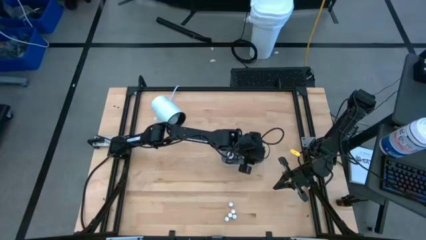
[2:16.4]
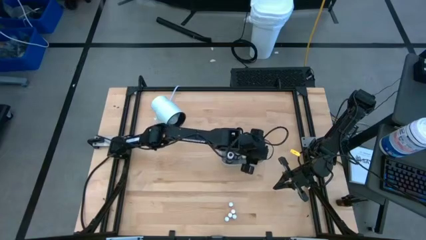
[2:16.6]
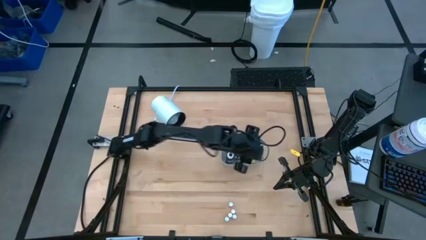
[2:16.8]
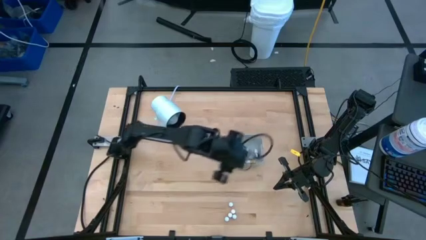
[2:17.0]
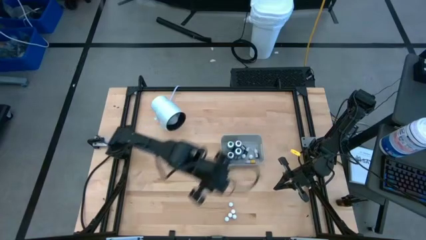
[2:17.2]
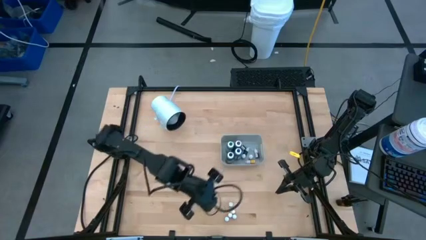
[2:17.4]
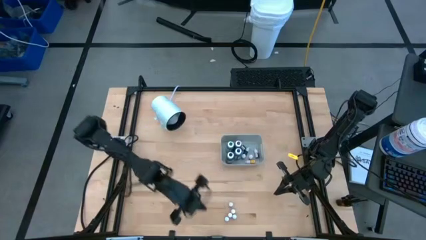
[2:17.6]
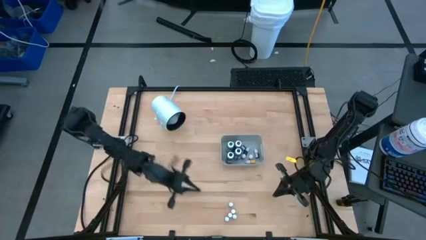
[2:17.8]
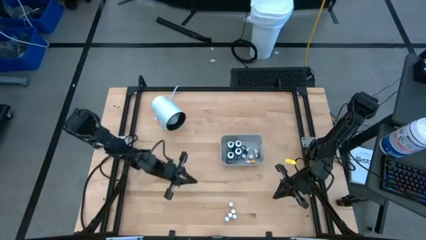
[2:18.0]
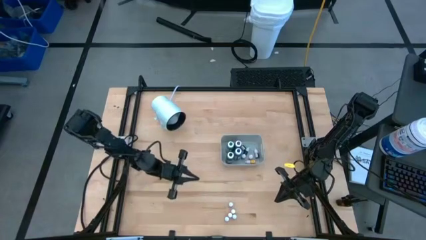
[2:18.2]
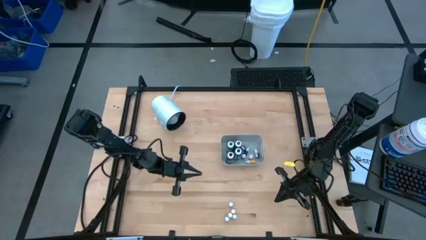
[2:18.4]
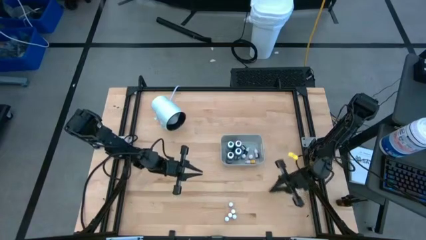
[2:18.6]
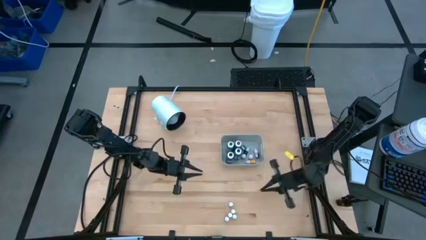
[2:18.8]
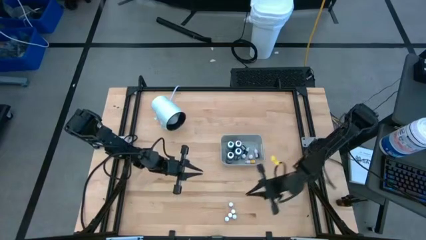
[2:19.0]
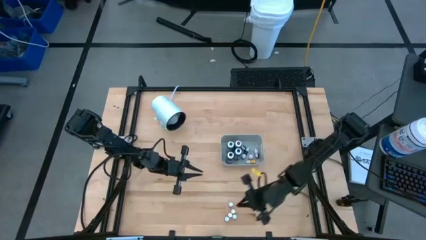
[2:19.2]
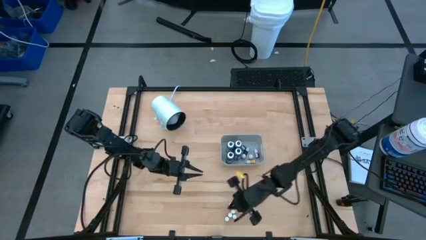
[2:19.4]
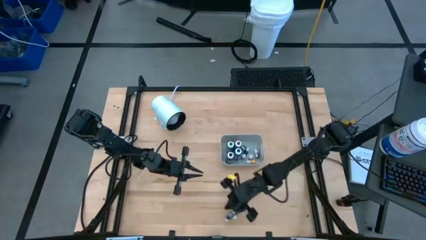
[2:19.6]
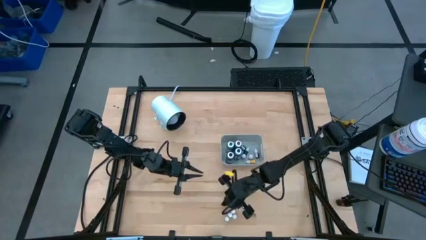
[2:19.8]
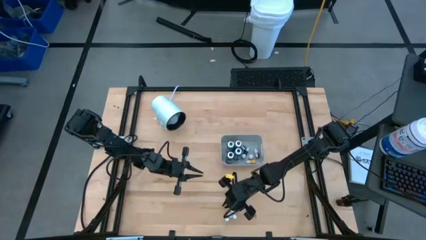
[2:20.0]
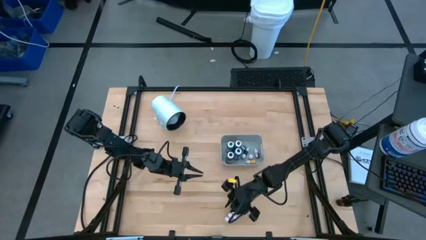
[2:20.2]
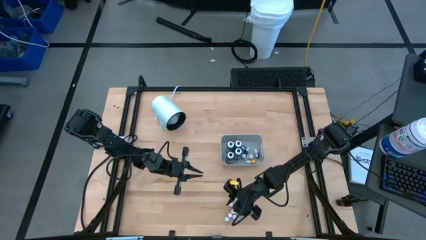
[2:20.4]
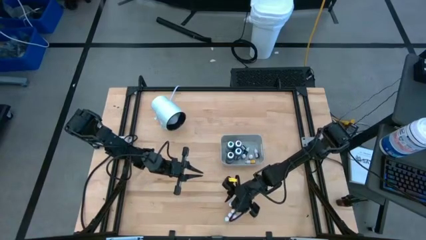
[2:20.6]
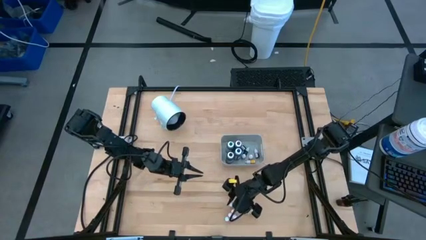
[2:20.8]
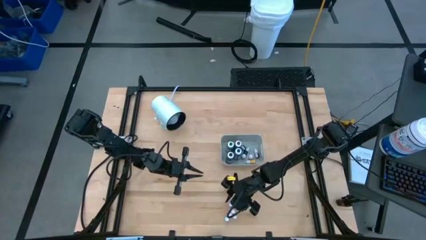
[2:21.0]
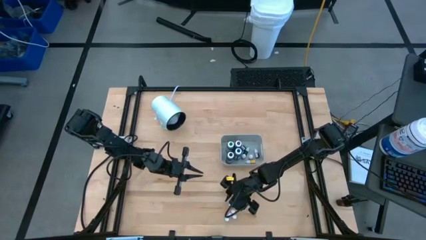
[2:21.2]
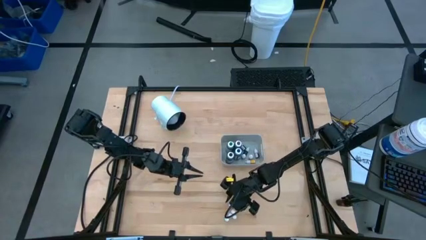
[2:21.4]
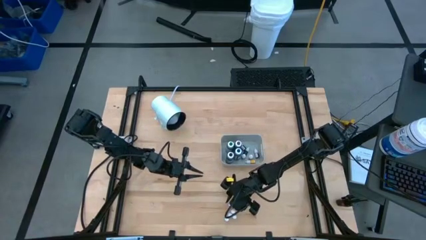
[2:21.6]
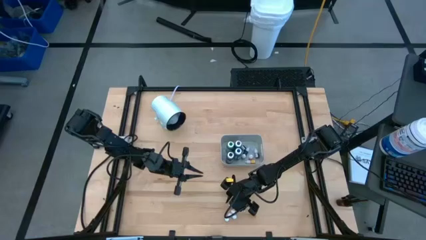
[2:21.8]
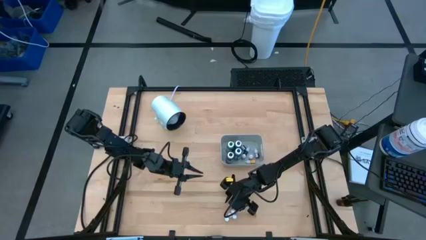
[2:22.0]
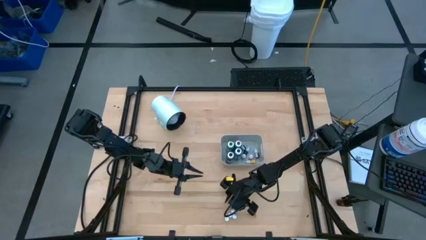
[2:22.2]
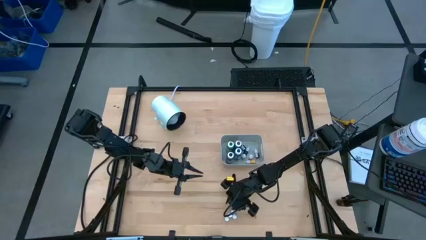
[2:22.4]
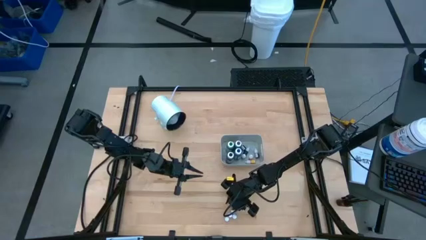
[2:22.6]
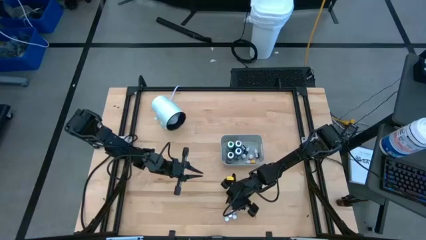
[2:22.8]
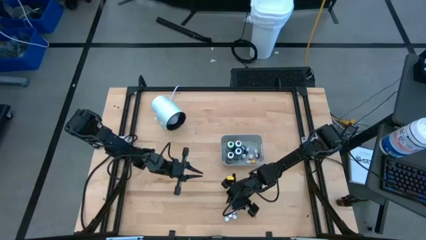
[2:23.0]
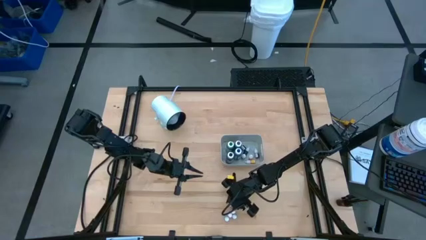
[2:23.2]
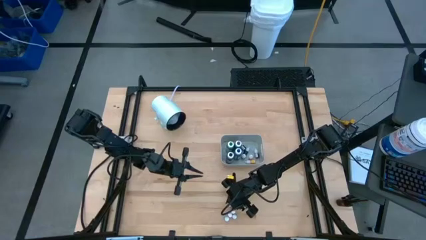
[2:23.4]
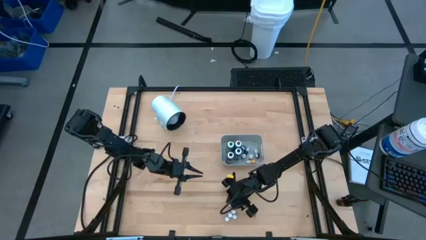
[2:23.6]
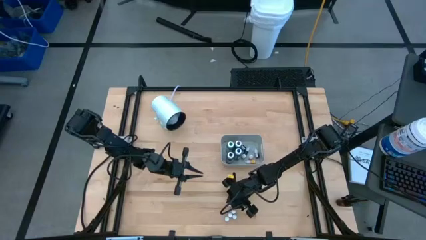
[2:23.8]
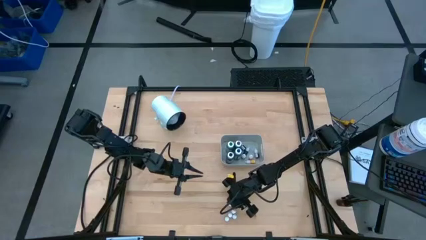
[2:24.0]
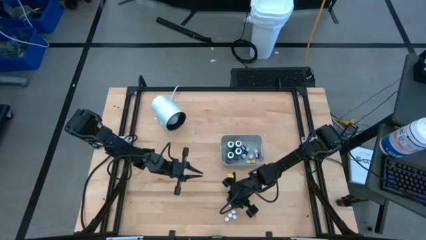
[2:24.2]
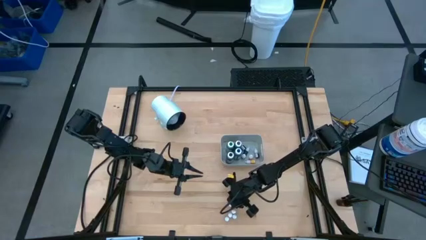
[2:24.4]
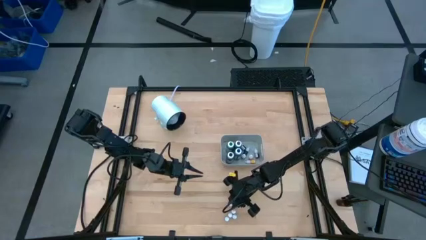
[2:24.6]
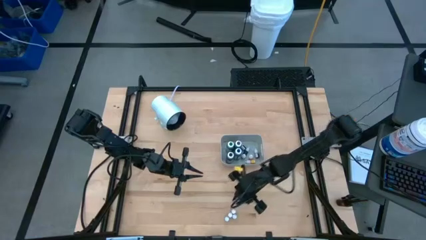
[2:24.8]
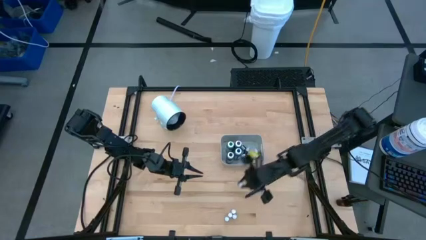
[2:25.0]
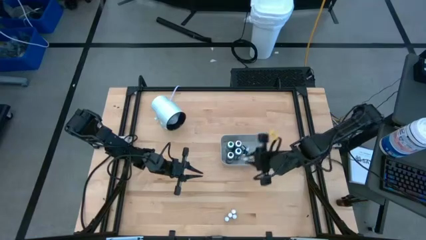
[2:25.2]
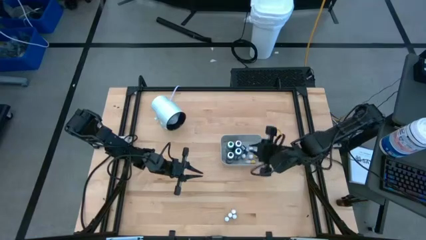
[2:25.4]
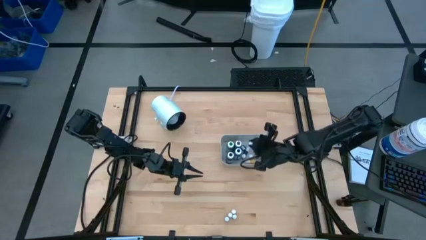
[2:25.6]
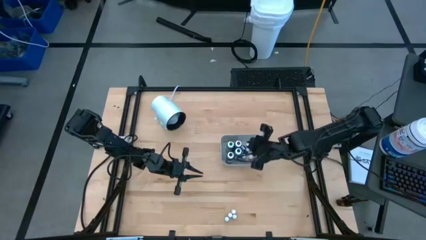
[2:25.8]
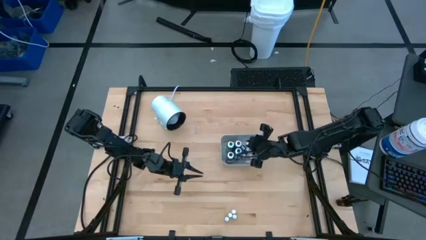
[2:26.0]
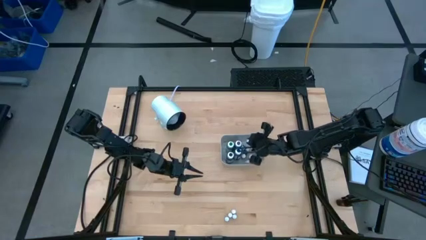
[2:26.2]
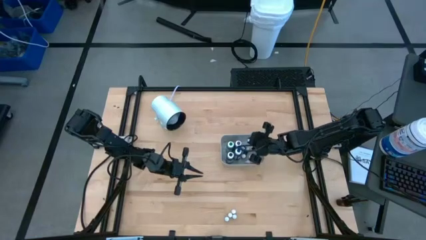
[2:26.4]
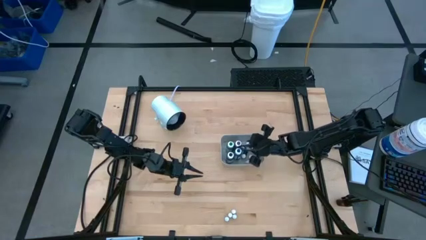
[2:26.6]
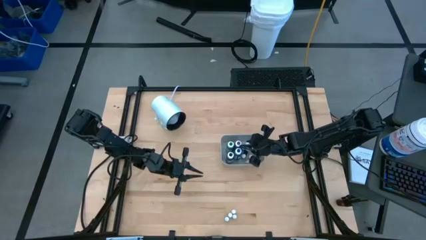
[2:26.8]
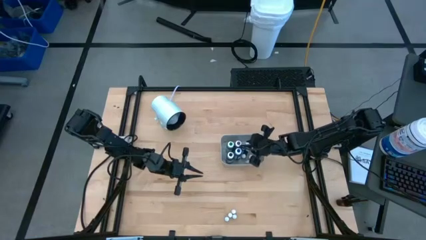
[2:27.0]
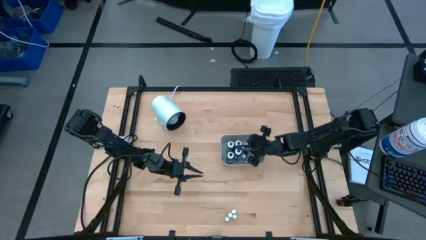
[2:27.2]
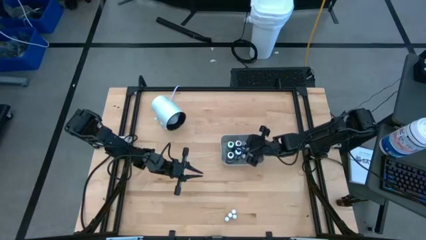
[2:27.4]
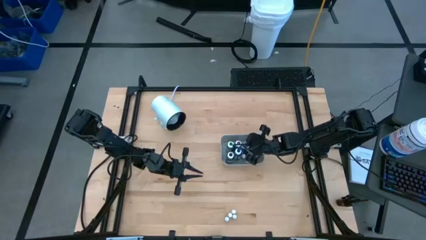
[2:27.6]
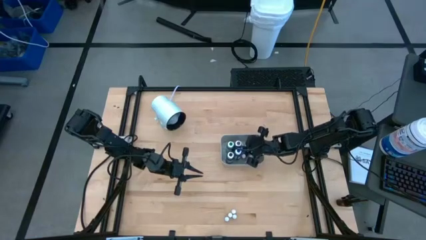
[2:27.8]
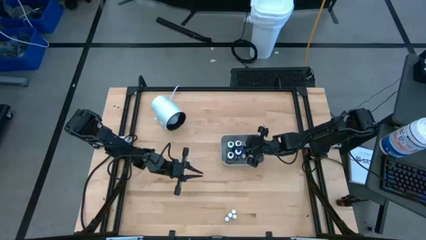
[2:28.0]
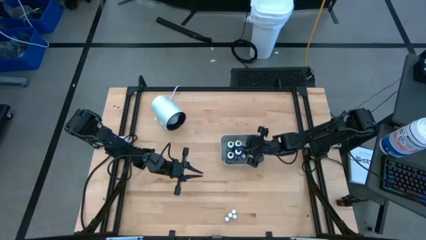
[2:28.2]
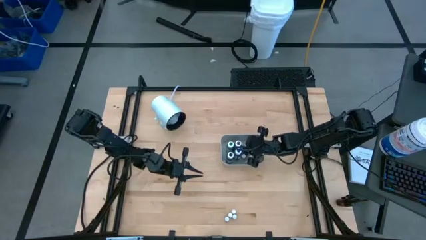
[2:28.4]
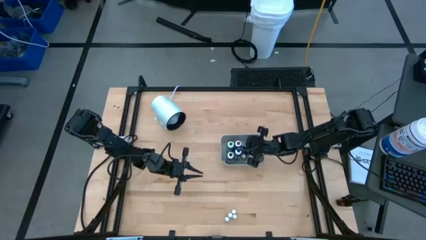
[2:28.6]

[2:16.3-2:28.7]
Task: Pick & Place food coloring
Put the small green food coloring bottle into the gray bin

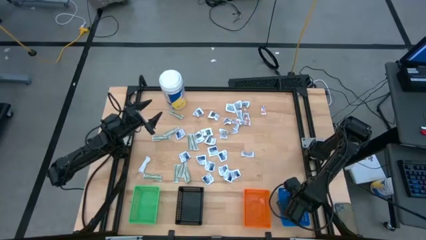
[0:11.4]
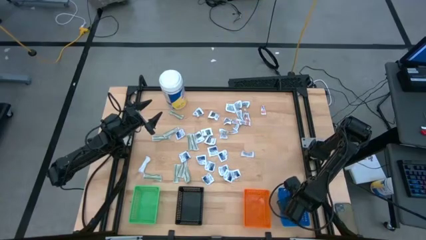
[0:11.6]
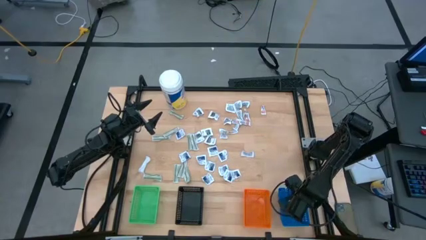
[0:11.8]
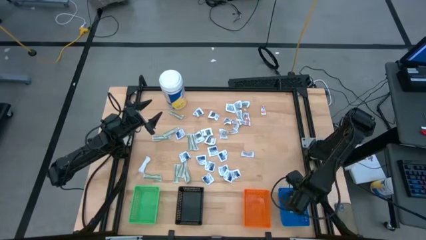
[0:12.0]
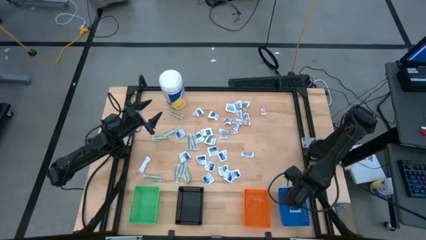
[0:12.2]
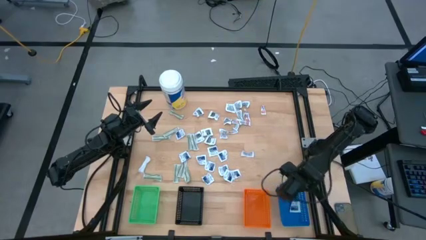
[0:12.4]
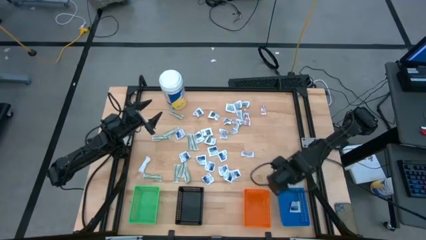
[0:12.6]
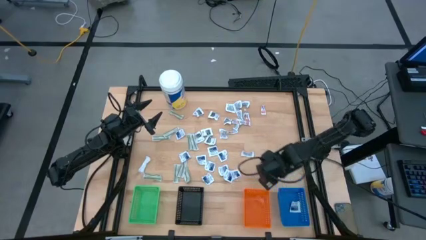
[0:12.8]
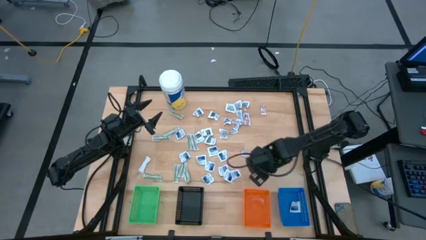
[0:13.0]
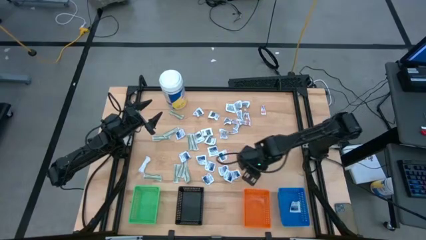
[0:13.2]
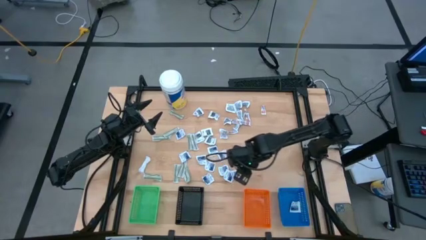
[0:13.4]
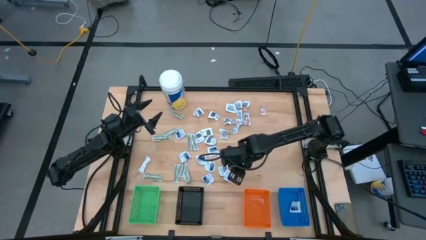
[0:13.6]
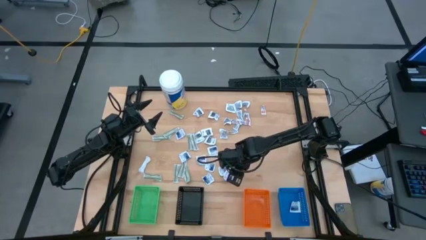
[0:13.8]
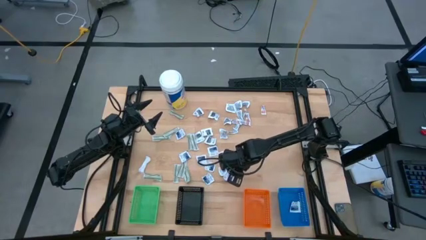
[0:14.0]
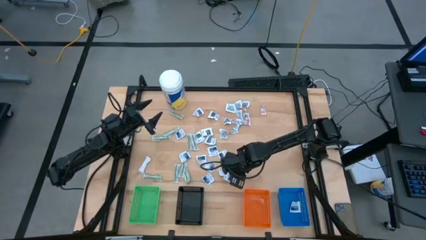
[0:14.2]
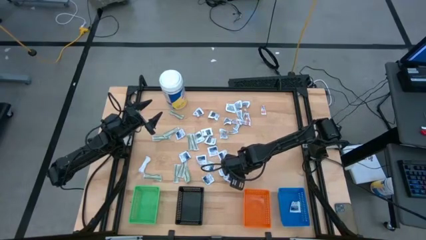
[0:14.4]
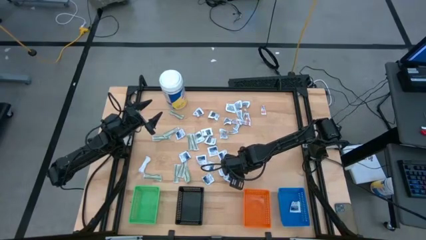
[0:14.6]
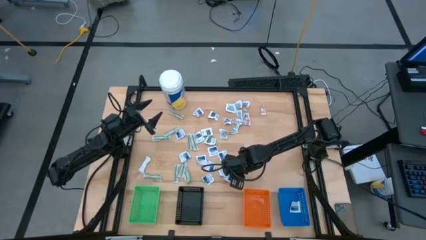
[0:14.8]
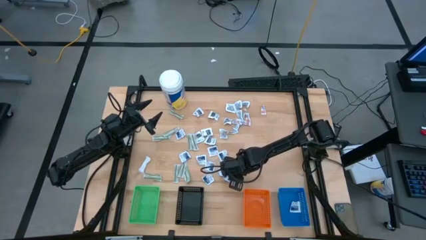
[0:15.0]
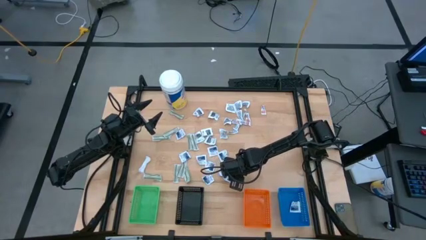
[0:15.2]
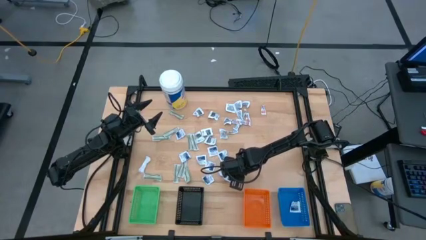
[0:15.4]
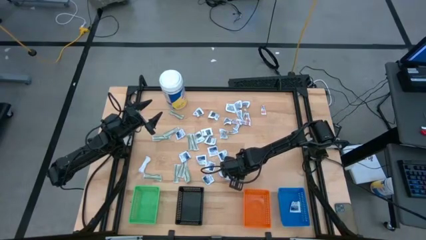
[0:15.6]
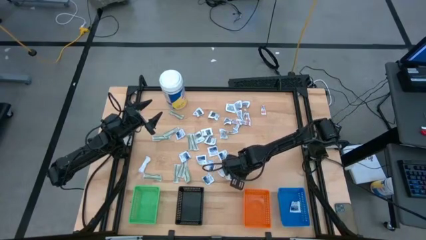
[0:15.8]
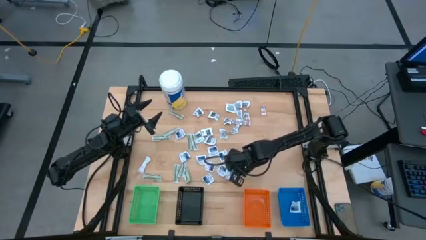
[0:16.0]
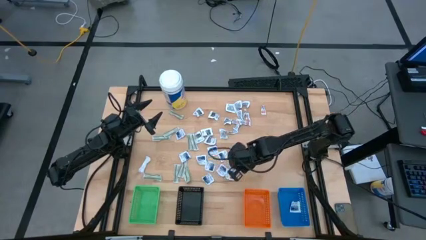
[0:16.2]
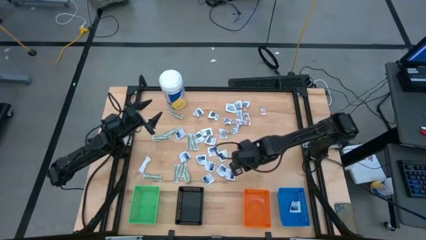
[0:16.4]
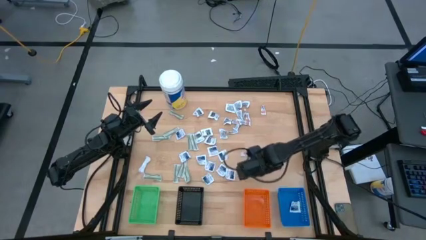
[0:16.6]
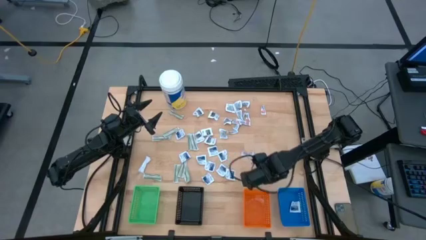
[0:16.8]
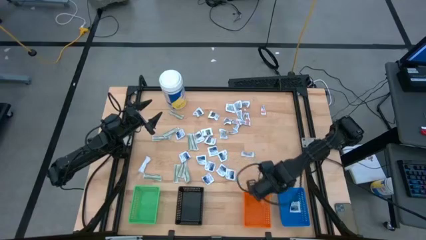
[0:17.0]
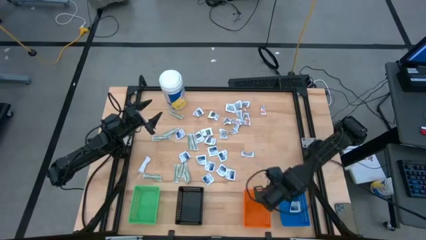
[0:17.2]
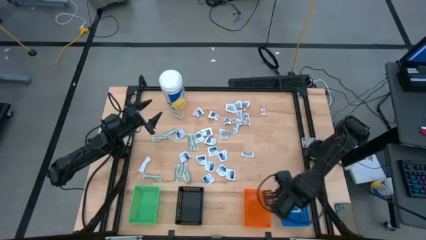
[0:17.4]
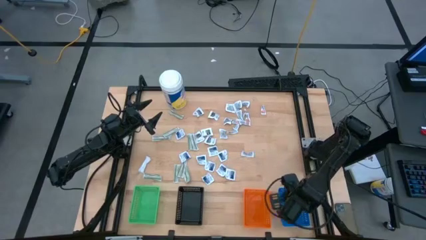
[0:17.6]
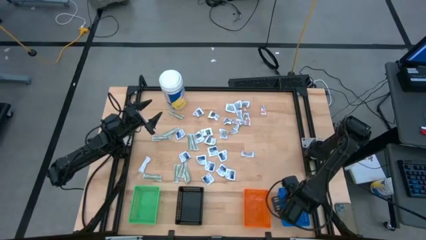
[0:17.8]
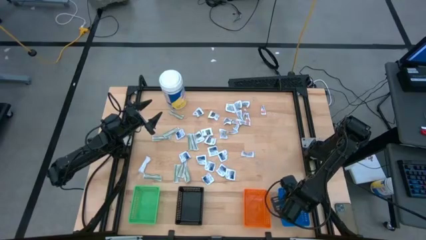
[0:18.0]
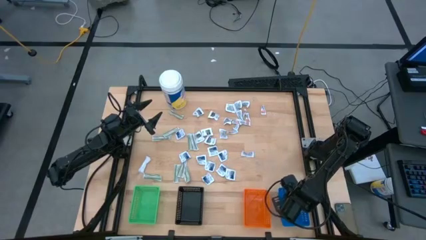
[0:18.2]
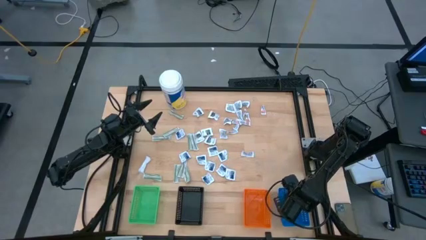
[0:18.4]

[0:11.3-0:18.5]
Task: Pick & Place First Aid Supplies
Put the alcohol pad into the blue bin
